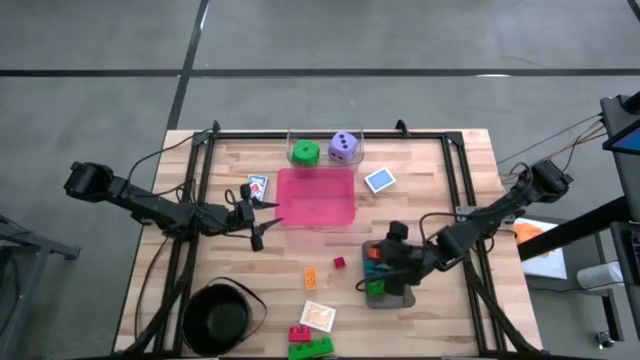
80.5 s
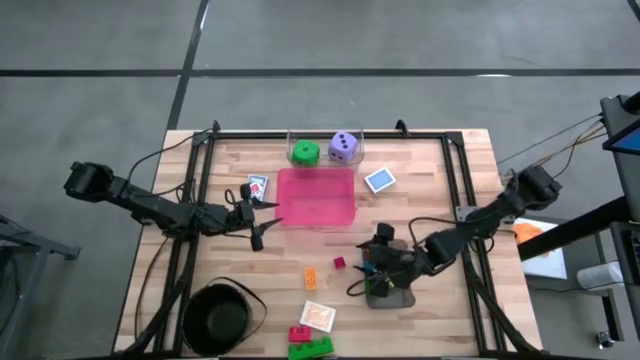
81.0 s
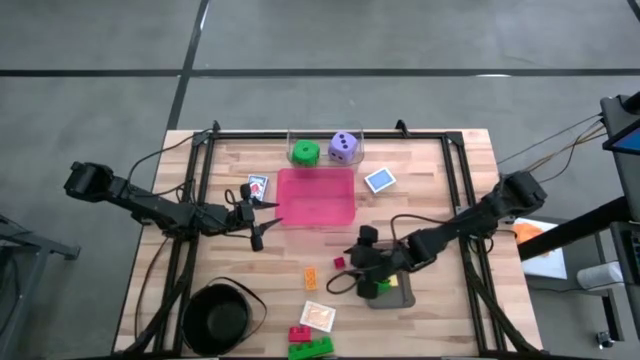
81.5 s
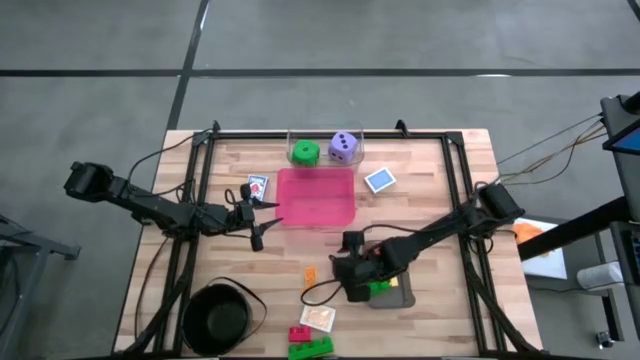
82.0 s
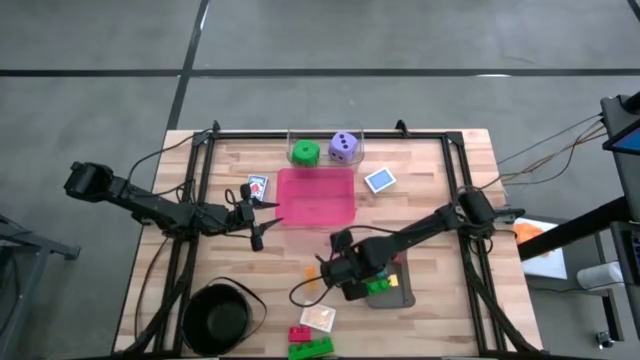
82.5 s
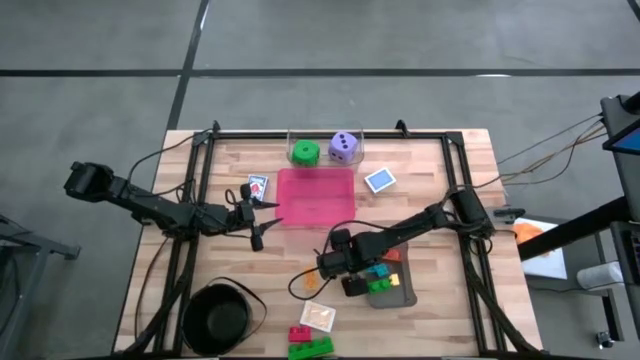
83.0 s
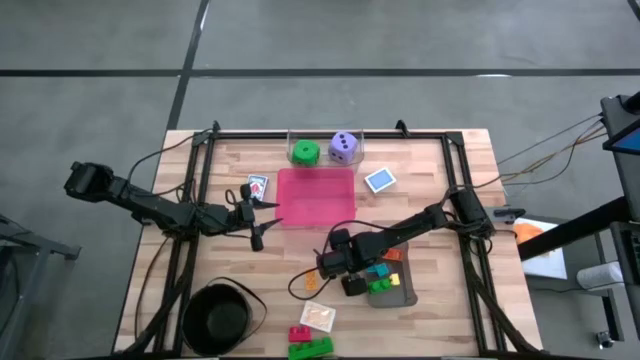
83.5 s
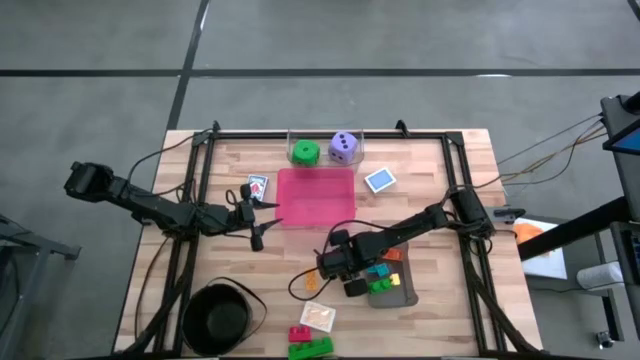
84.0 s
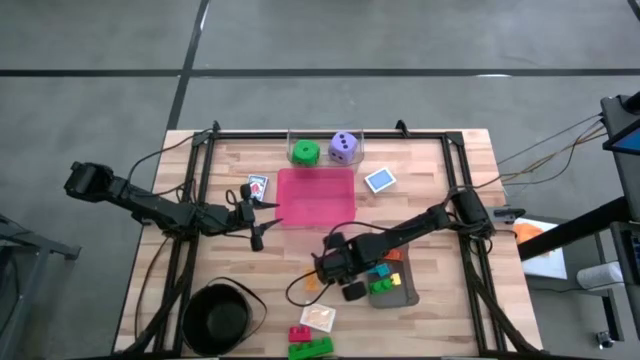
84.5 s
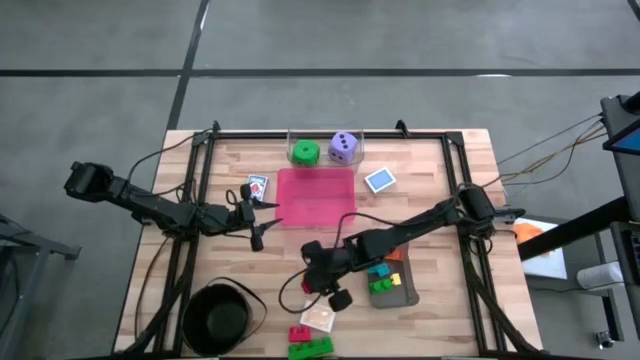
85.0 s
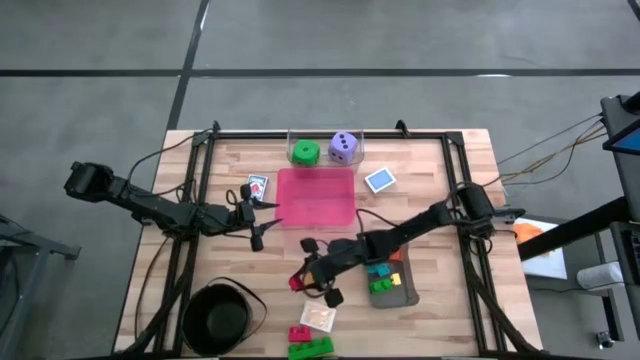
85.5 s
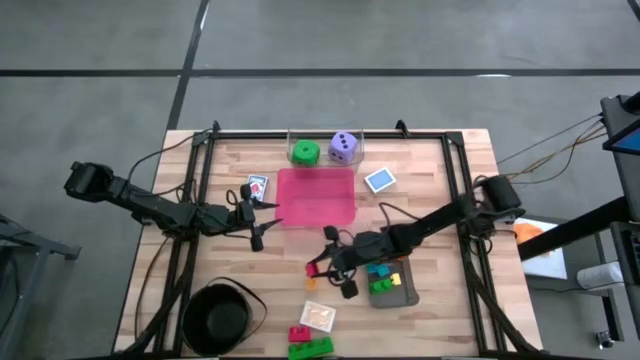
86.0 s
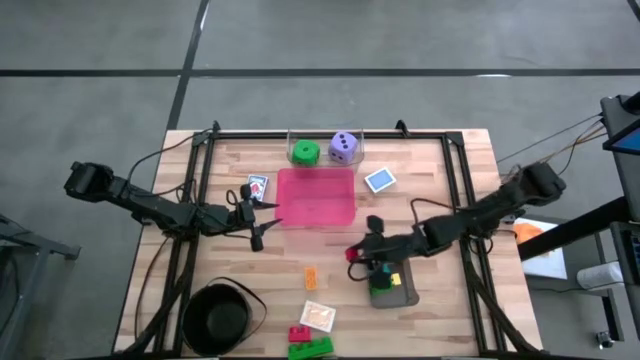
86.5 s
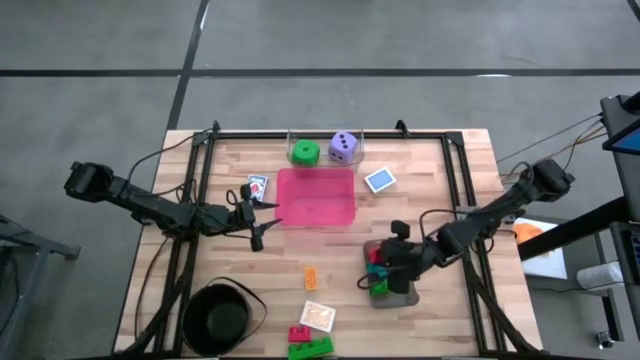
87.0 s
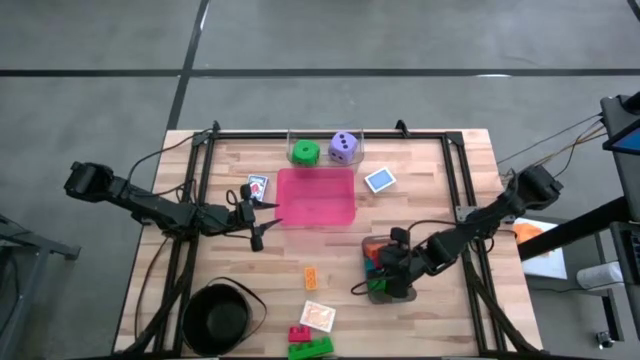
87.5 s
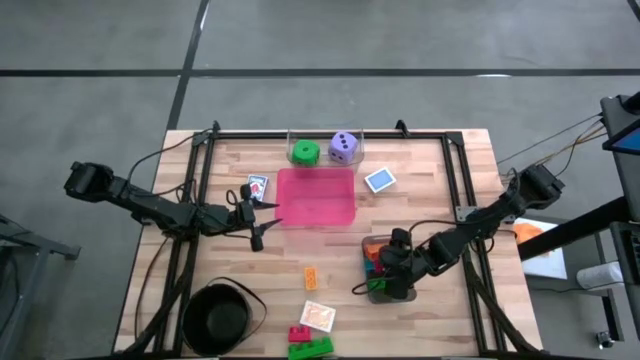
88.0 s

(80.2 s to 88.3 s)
Task: Pick & Place Toys
Put the small red game piece into the black bin

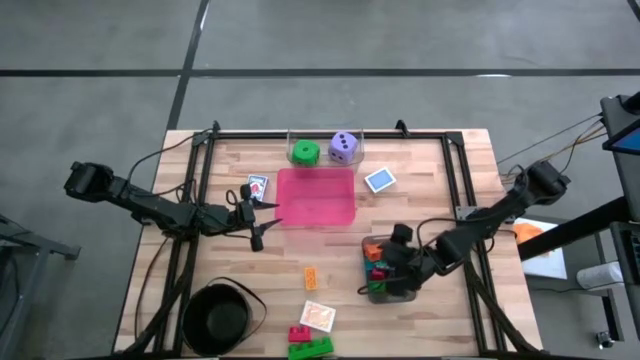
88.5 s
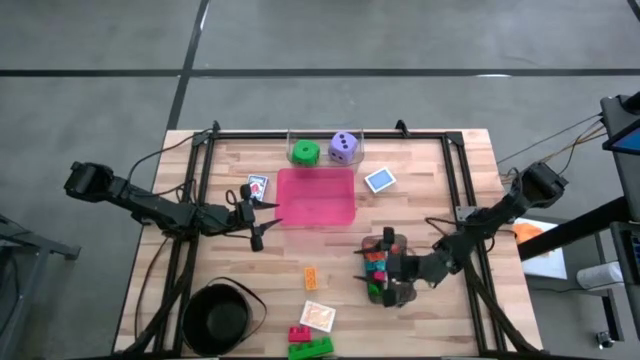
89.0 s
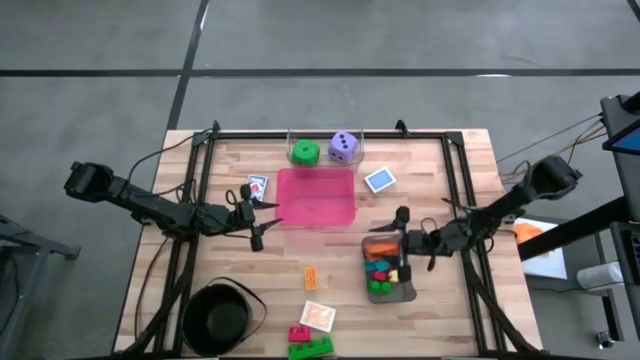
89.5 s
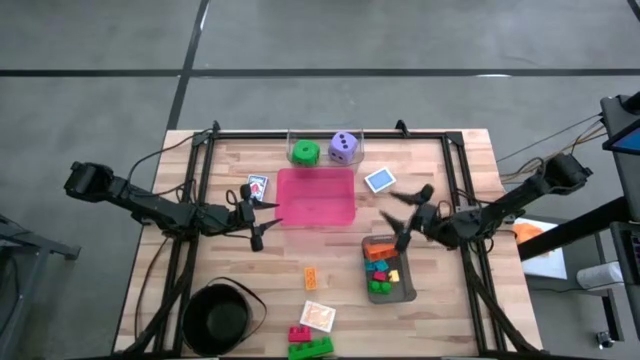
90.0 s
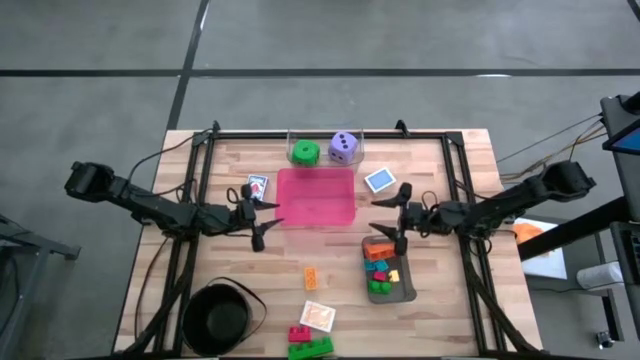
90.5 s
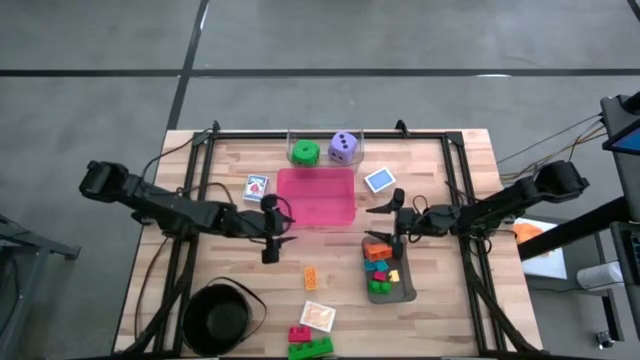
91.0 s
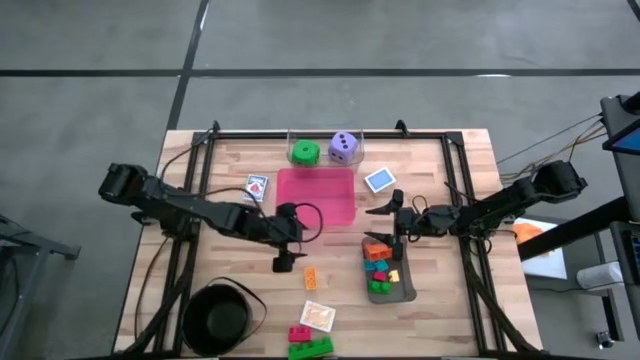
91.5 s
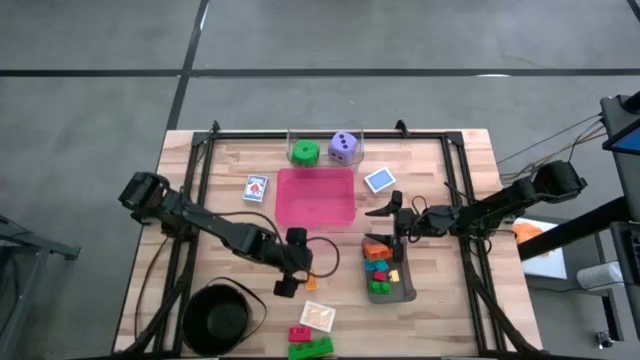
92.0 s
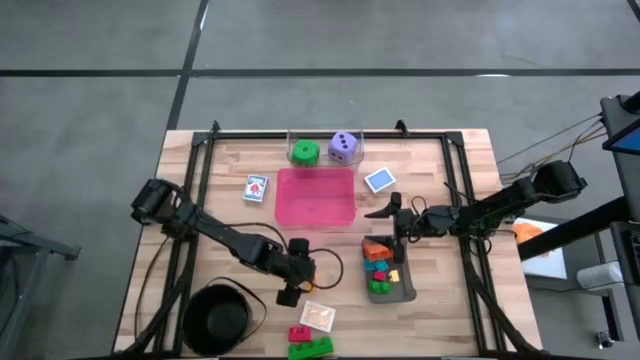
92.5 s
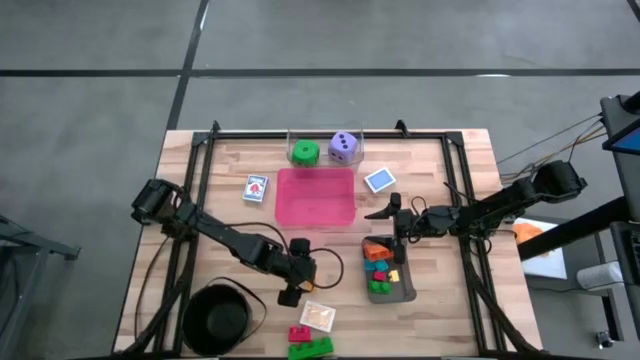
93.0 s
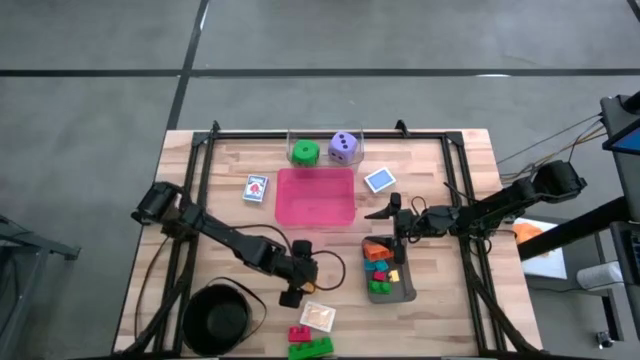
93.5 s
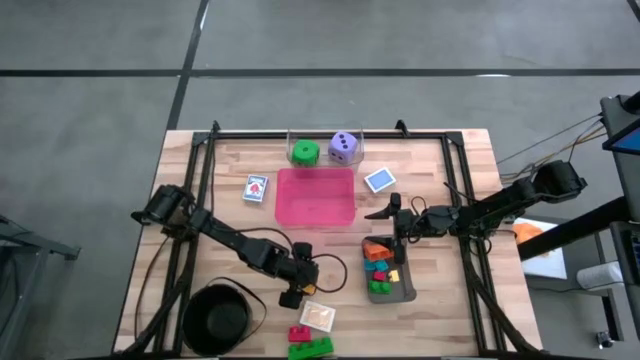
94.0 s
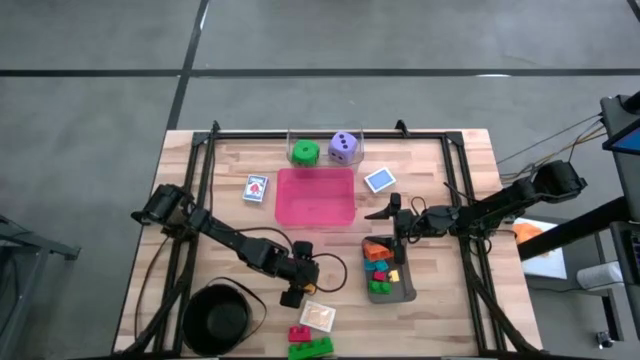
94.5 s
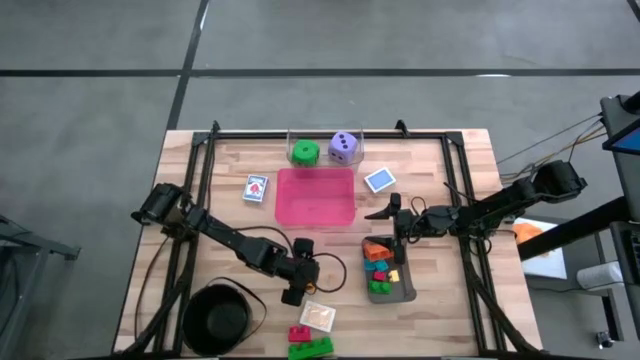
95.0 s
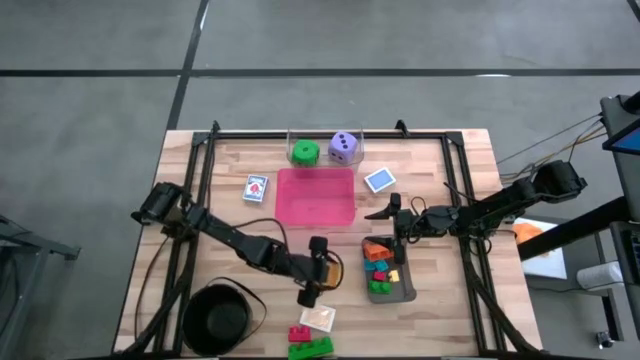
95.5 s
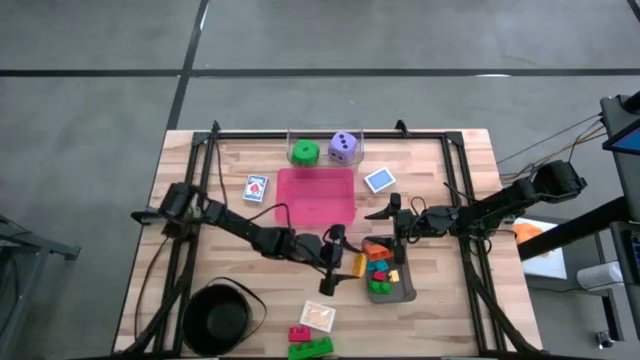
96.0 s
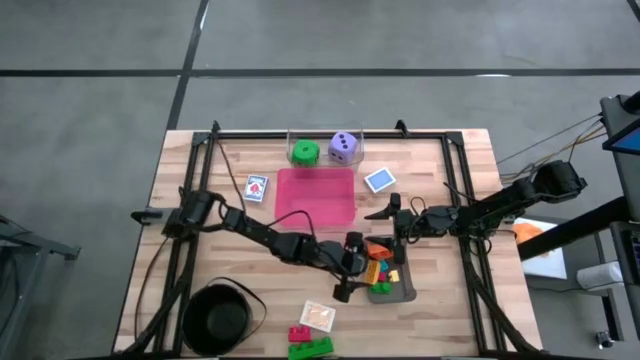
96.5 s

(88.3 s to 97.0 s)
Put the big yellow game piece into the black bin

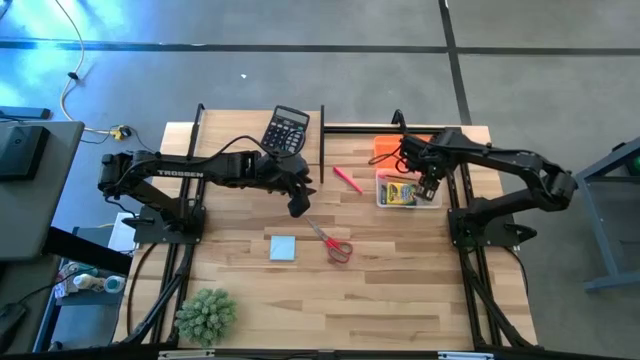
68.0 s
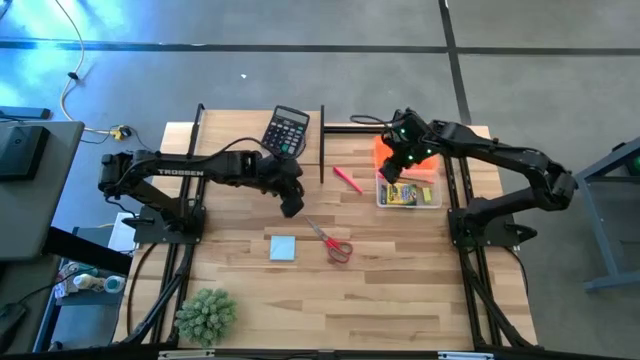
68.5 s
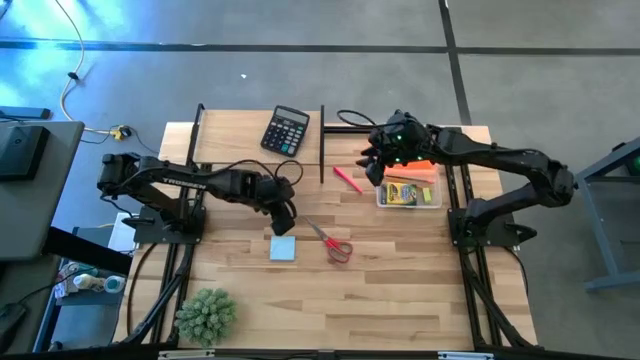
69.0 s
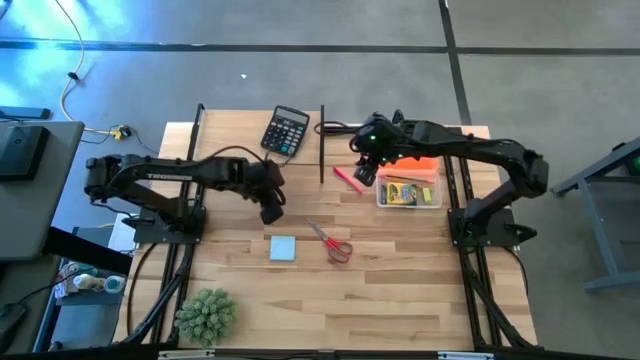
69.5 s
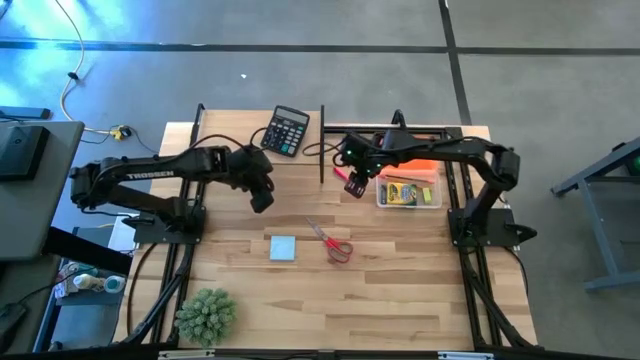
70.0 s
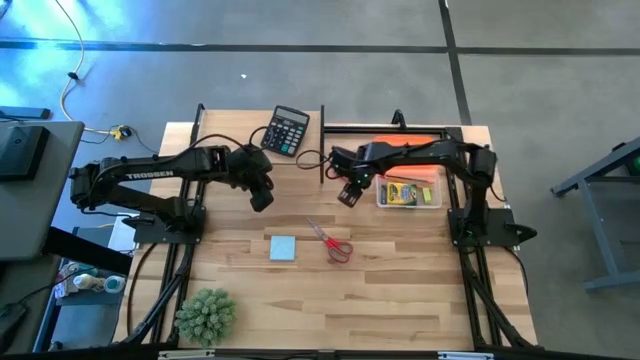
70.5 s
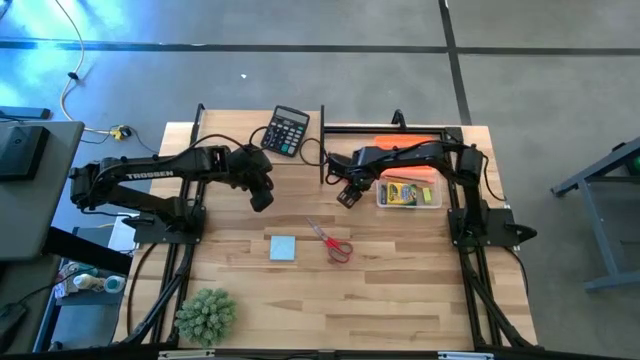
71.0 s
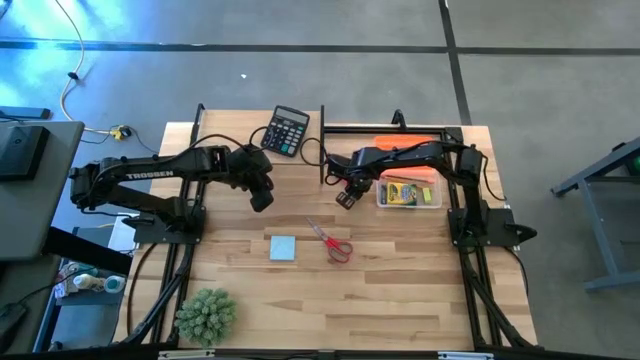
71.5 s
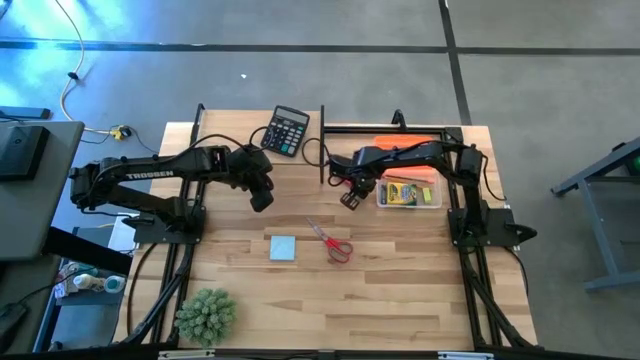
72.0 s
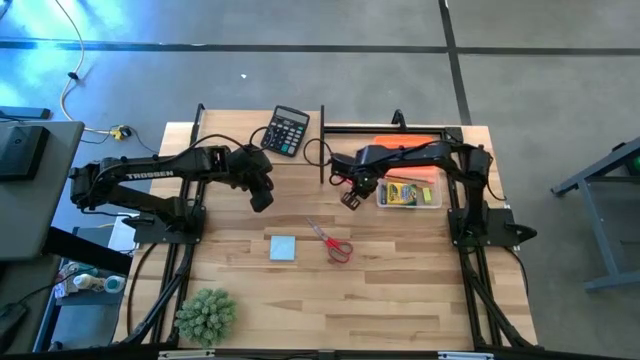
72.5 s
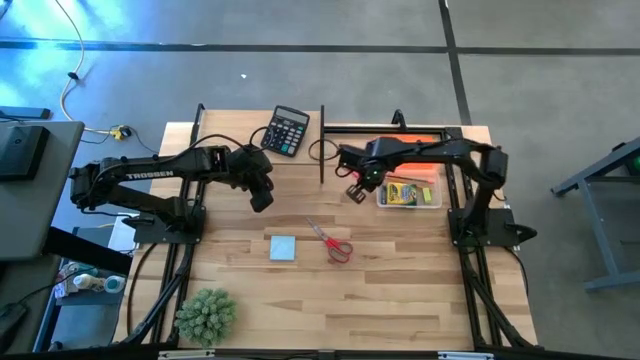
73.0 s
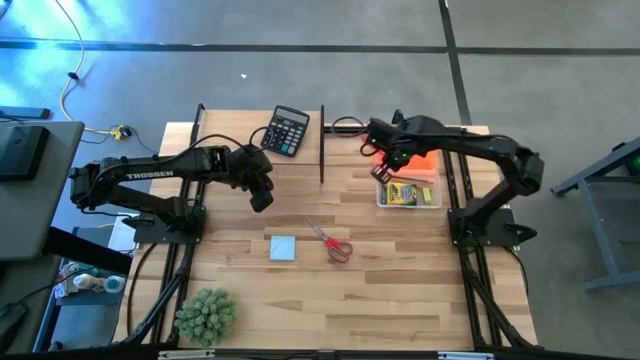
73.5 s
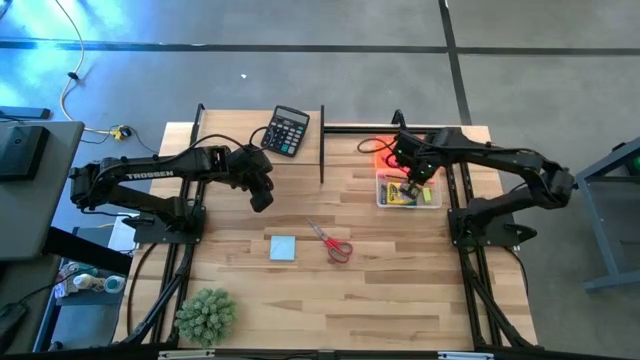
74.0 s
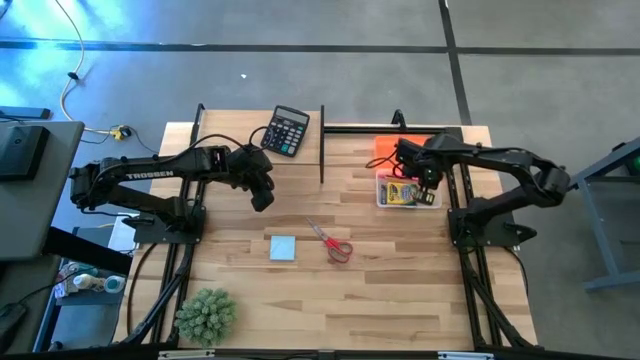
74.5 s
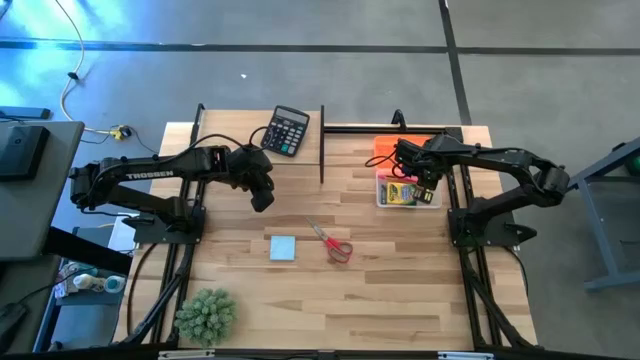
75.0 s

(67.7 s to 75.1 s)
Task: Pack school essentials
Put the pink pen into the orange supply box
